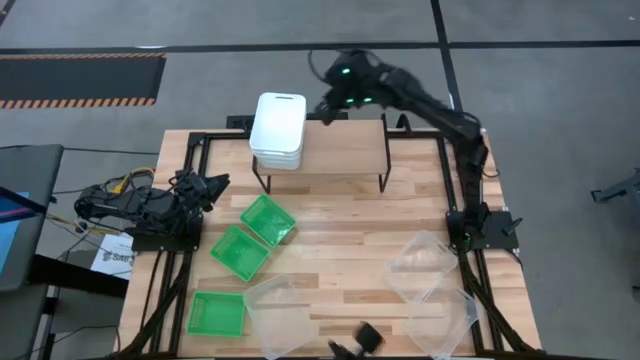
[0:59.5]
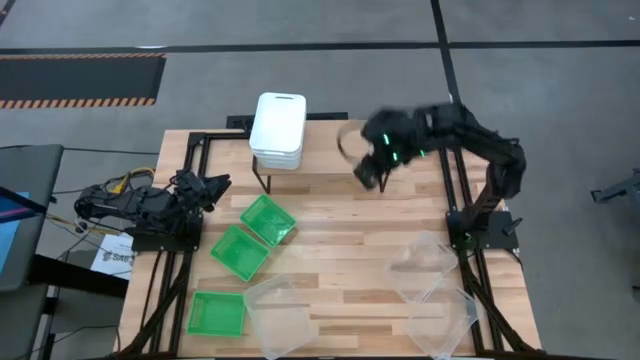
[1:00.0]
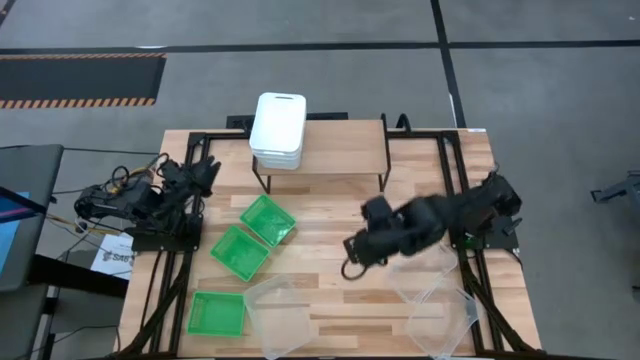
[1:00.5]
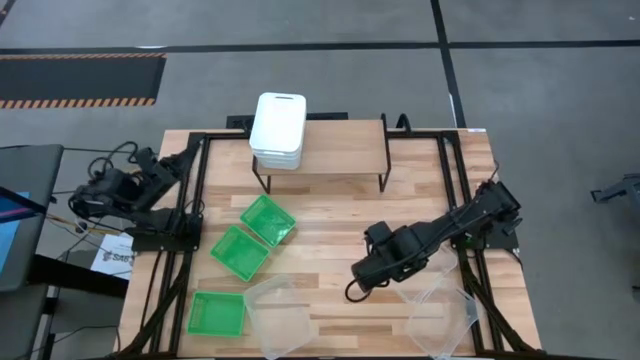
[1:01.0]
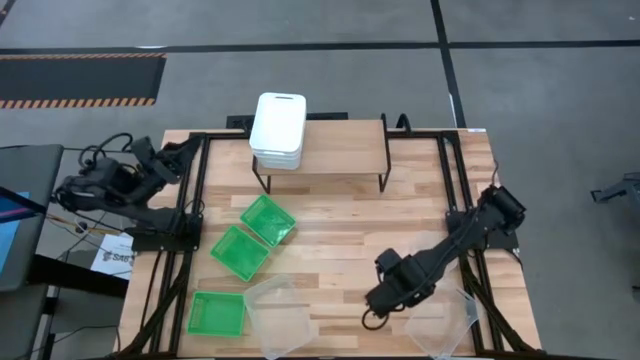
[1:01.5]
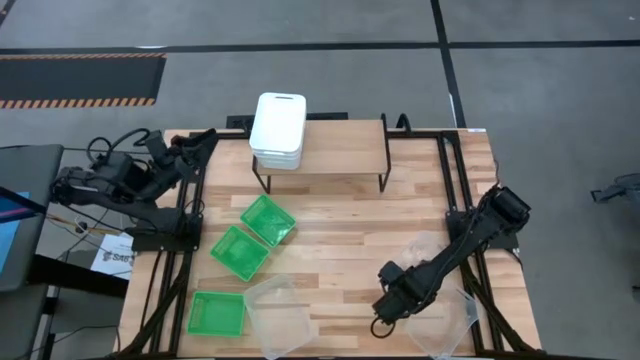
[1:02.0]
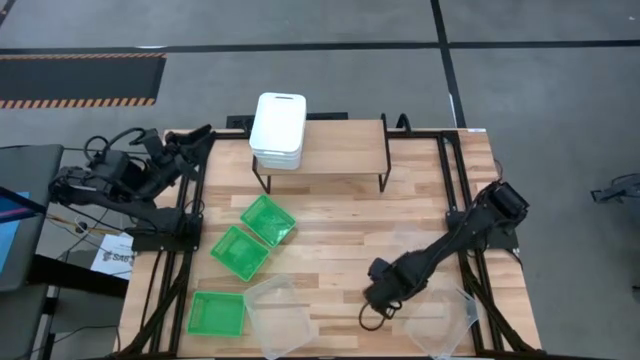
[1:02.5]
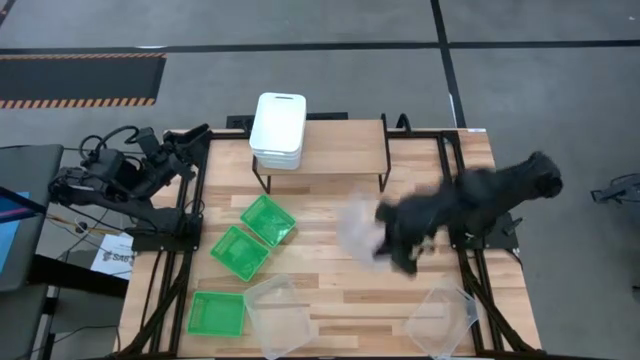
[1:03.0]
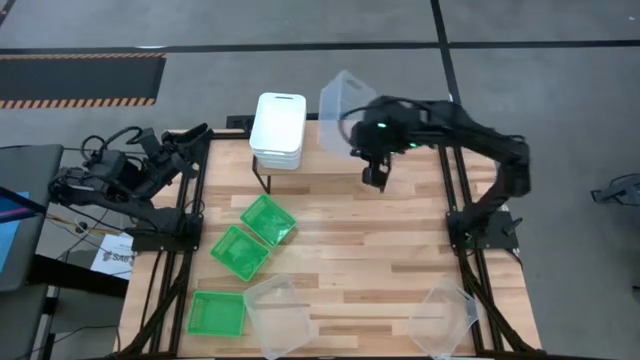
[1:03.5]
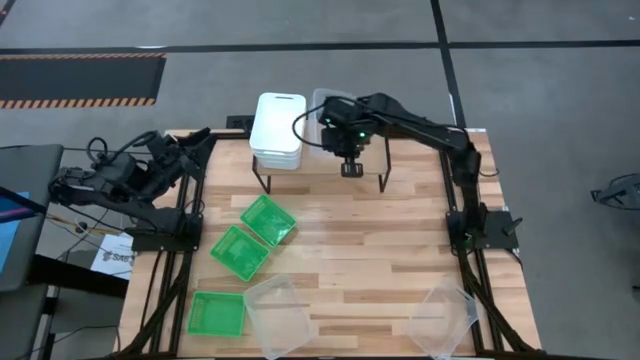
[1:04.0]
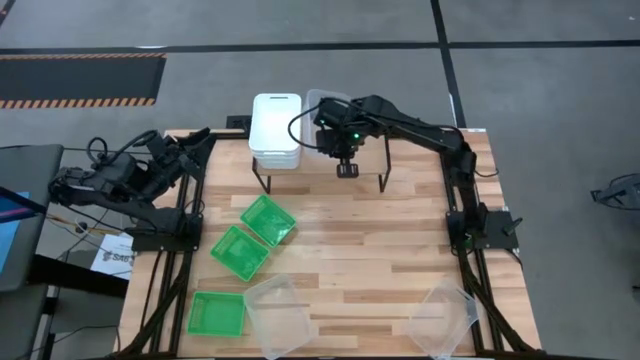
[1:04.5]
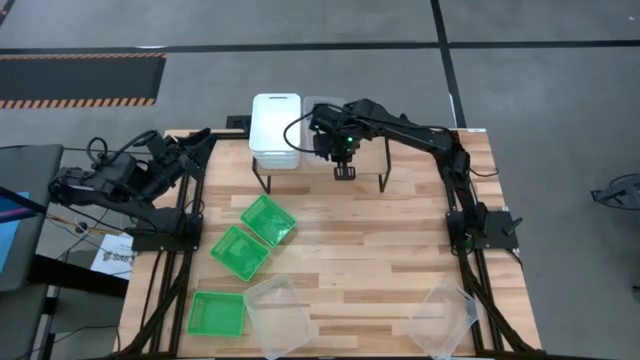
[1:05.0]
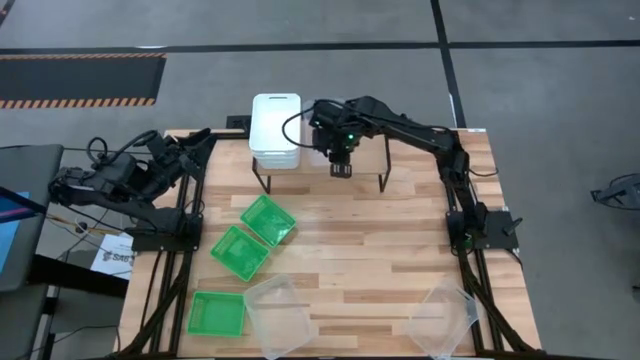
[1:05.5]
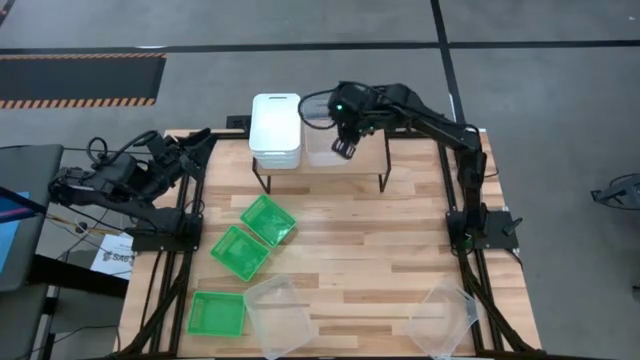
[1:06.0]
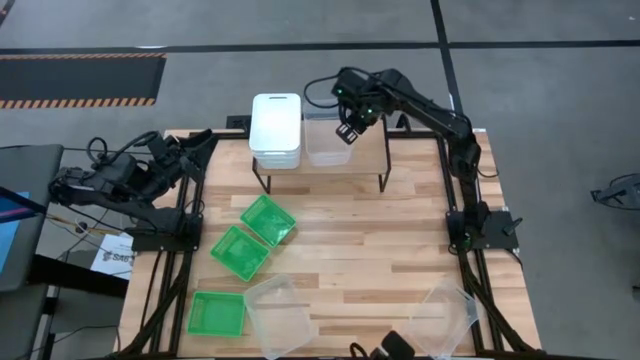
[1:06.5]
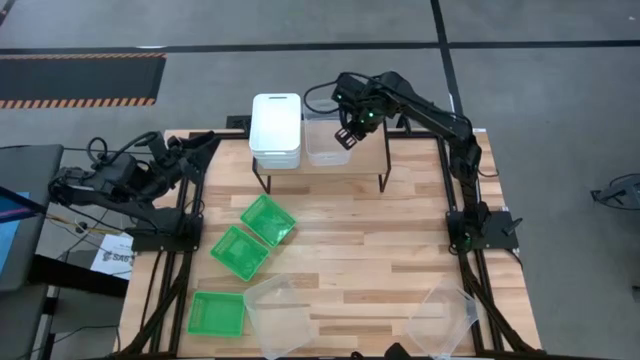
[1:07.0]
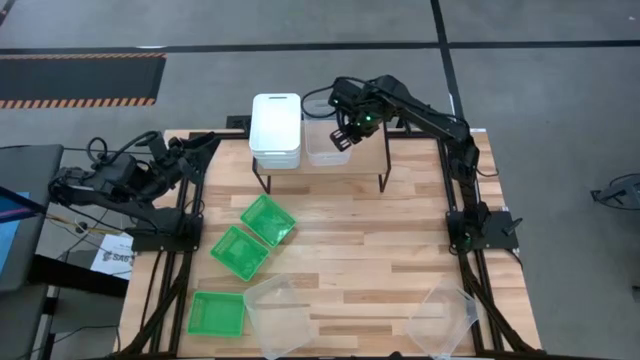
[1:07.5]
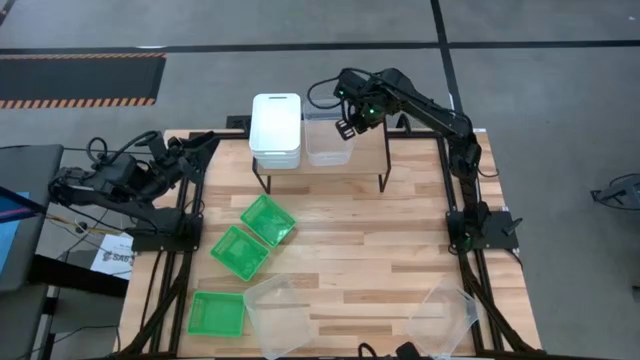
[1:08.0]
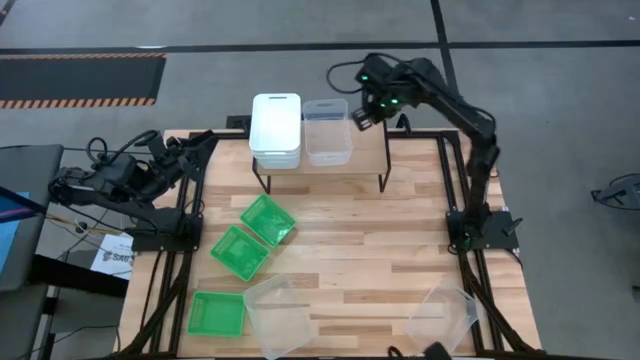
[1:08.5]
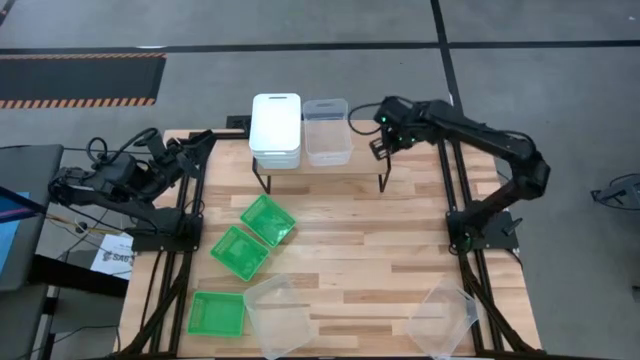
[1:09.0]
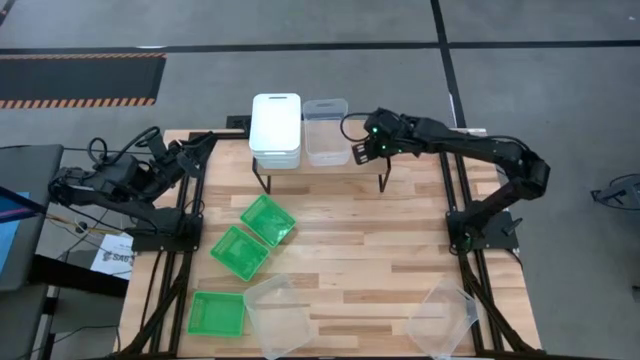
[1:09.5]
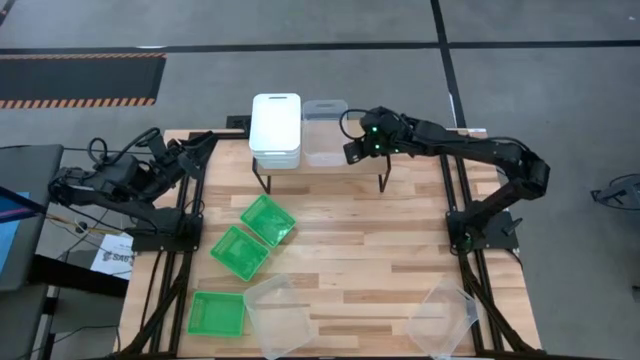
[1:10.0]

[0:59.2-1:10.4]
Task: Stack baskets on shelf by color
Put the top transparent bin on the shelf

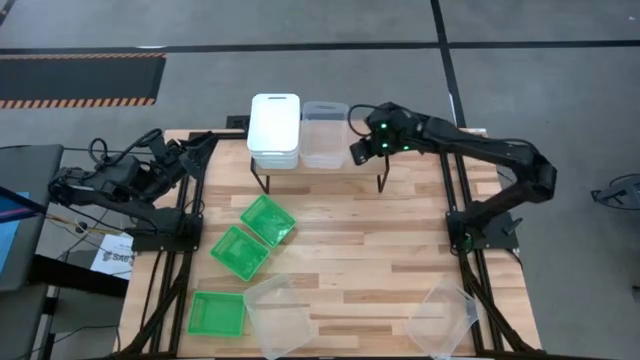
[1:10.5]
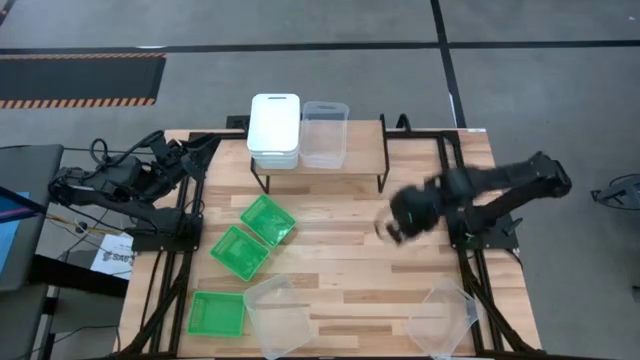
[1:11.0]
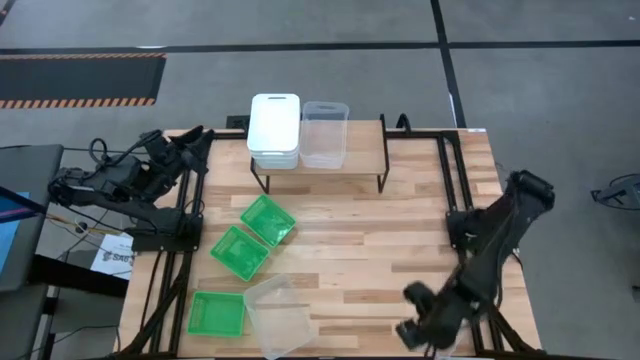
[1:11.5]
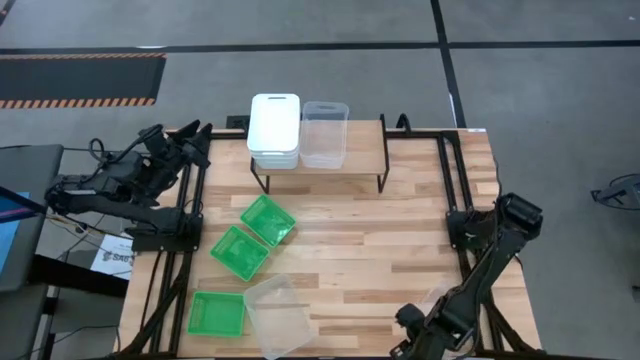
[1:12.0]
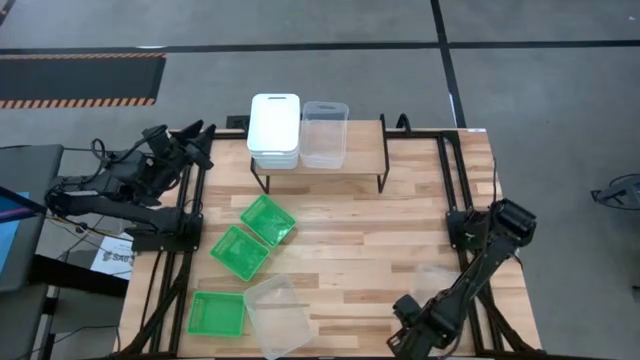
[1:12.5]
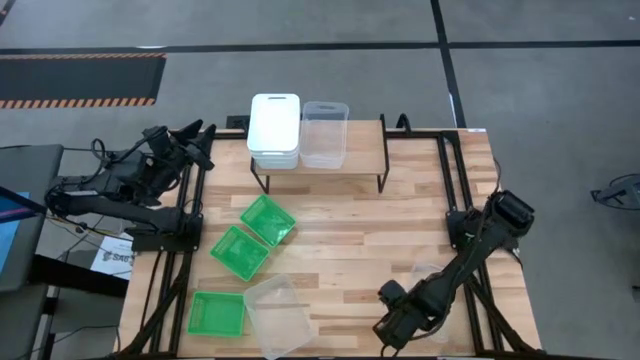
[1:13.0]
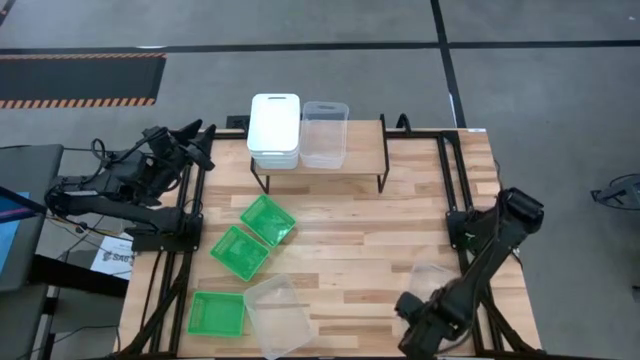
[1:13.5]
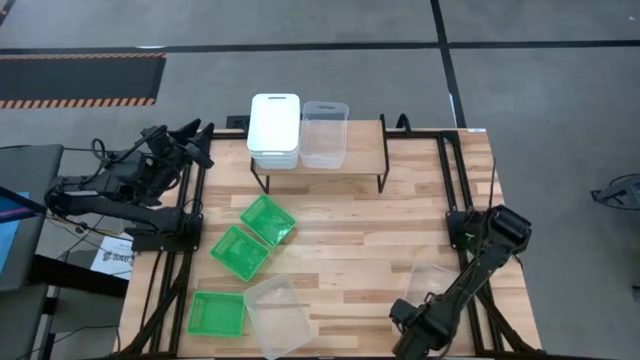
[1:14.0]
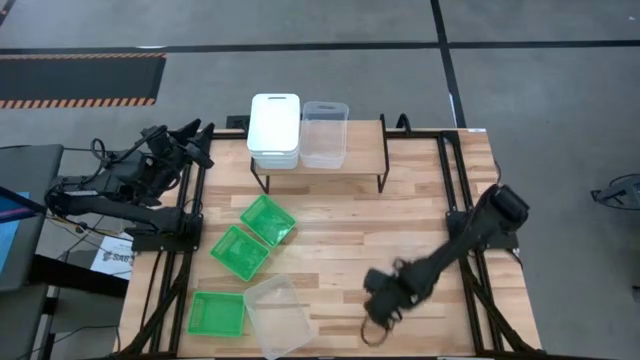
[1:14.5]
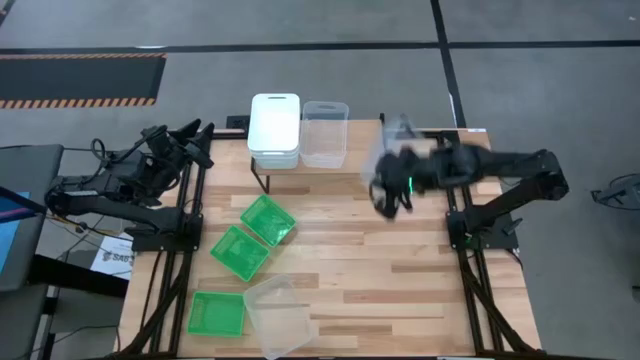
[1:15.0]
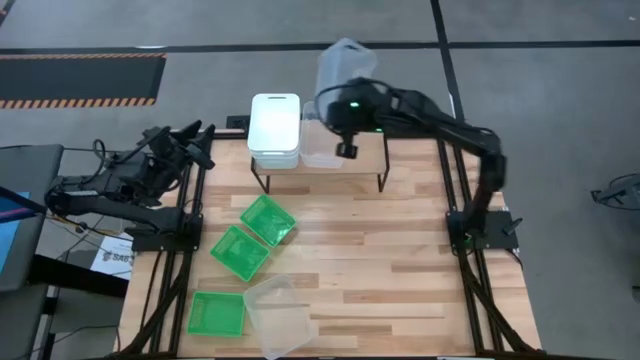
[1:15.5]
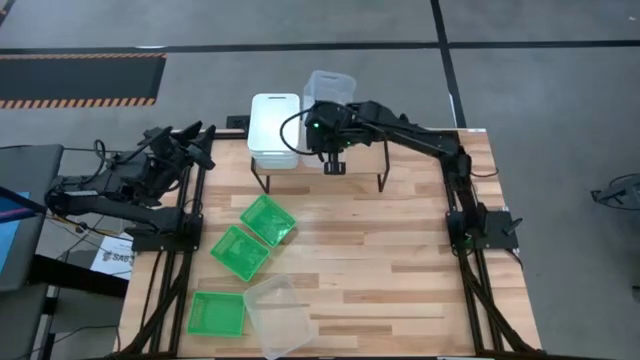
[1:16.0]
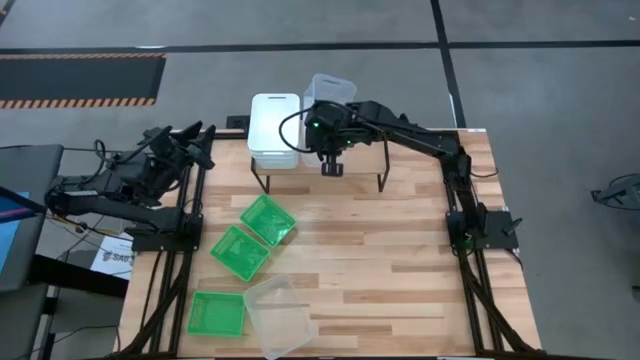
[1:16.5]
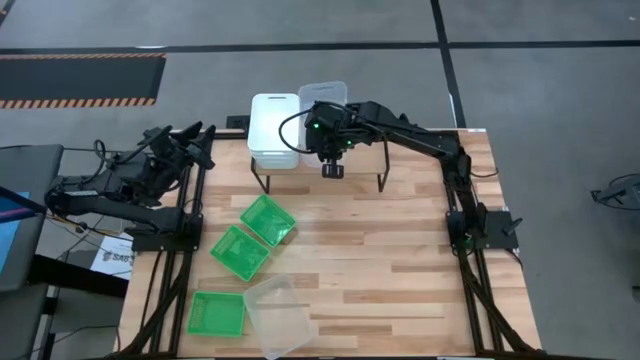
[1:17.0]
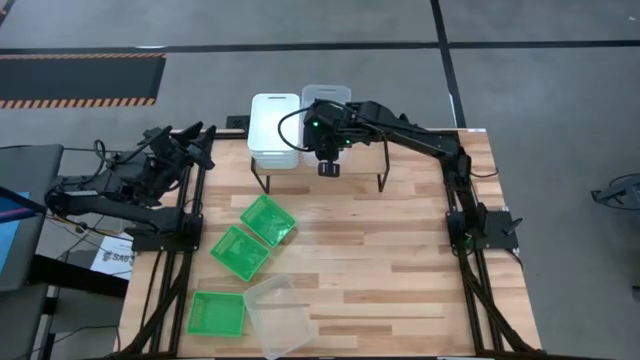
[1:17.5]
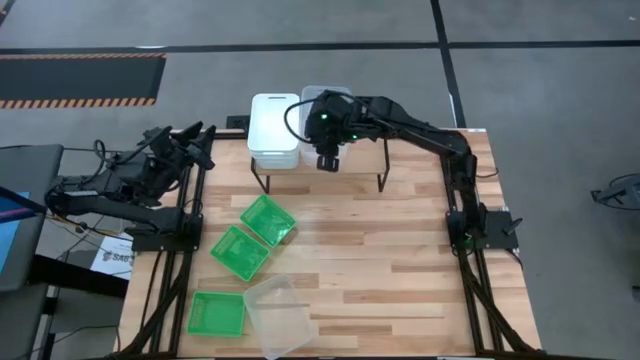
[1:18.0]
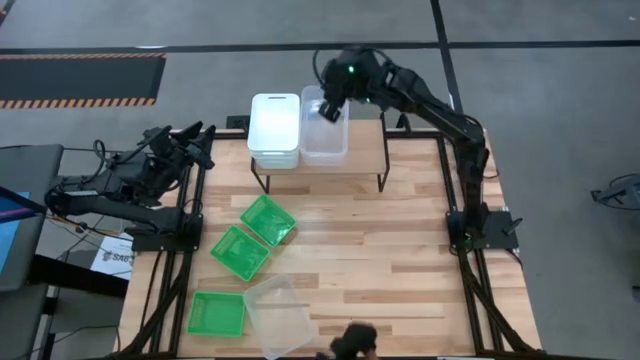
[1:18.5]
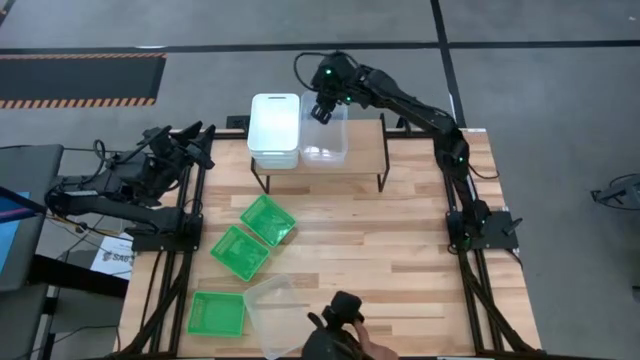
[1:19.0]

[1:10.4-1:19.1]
Stack the right transparent bin on the transparent bin on the shelf
